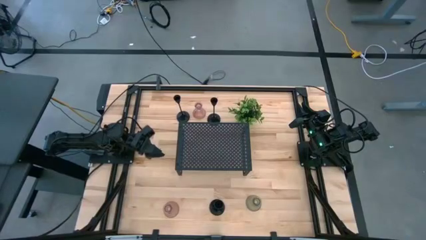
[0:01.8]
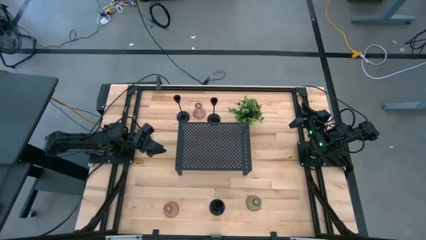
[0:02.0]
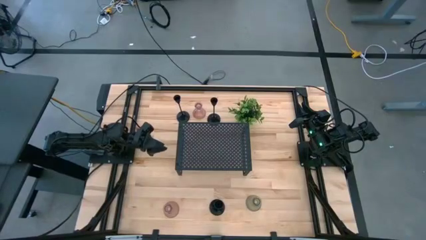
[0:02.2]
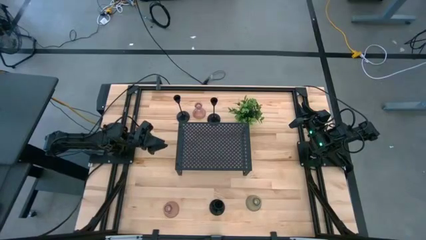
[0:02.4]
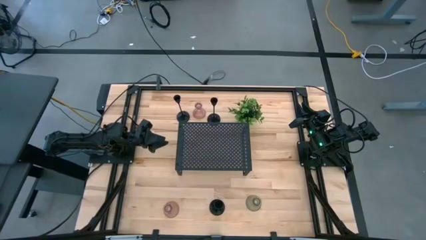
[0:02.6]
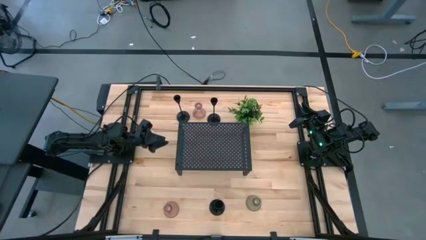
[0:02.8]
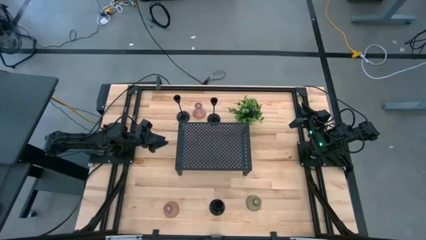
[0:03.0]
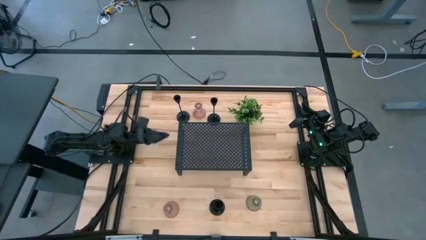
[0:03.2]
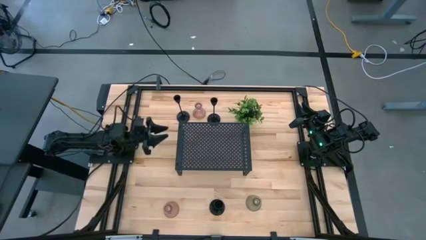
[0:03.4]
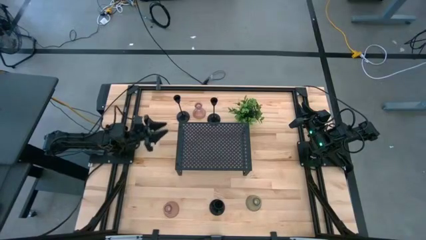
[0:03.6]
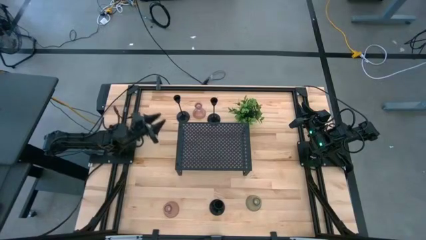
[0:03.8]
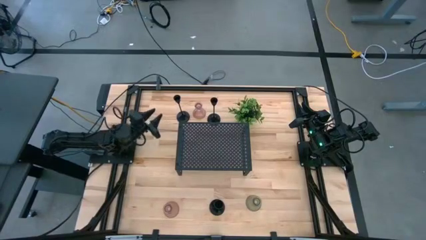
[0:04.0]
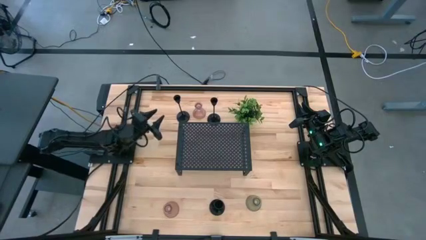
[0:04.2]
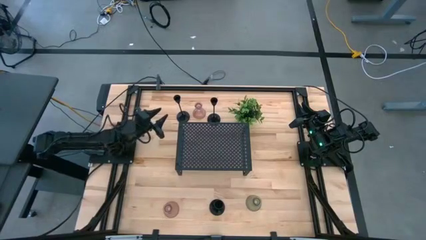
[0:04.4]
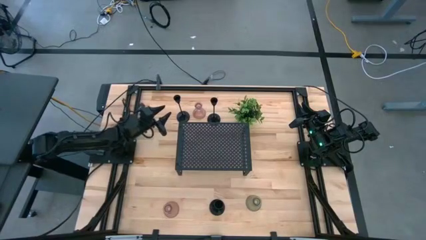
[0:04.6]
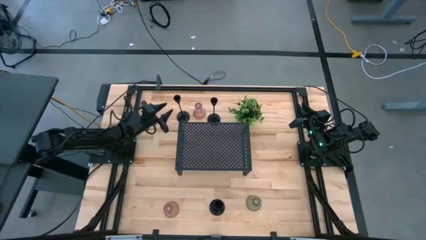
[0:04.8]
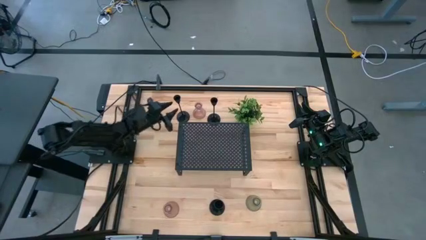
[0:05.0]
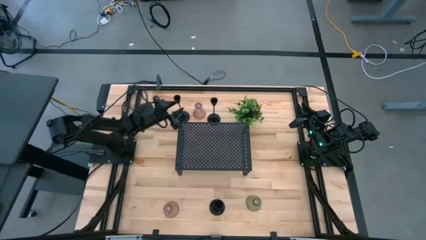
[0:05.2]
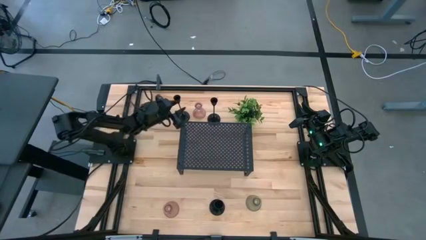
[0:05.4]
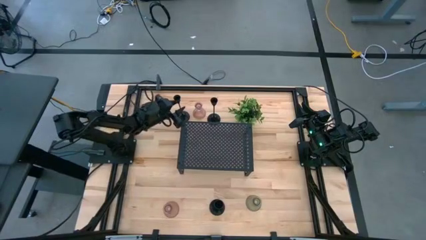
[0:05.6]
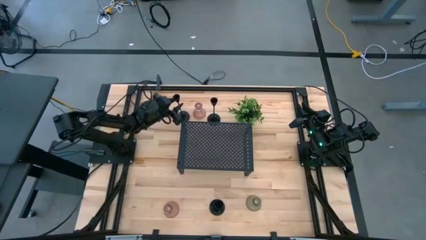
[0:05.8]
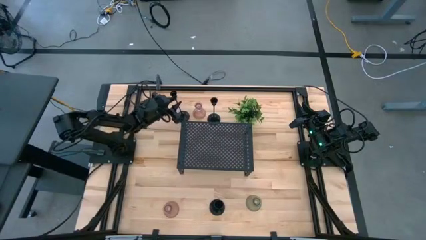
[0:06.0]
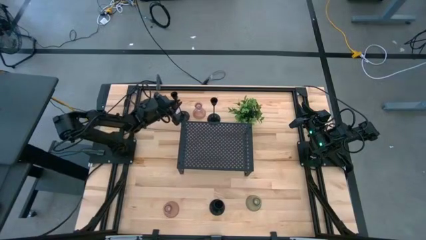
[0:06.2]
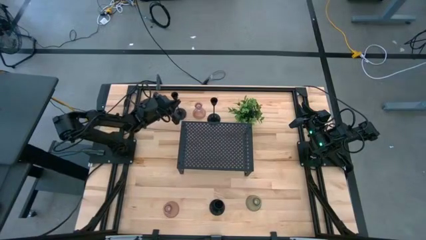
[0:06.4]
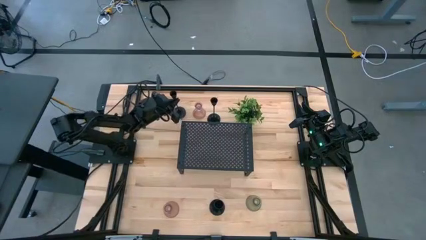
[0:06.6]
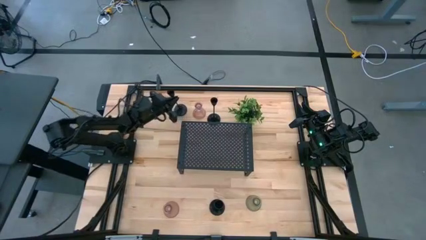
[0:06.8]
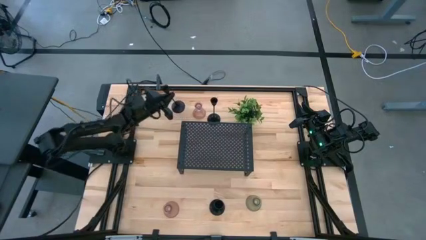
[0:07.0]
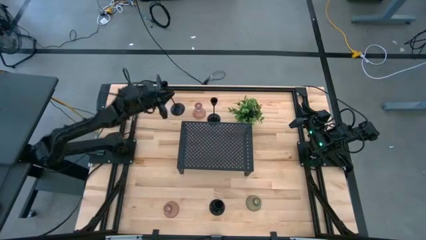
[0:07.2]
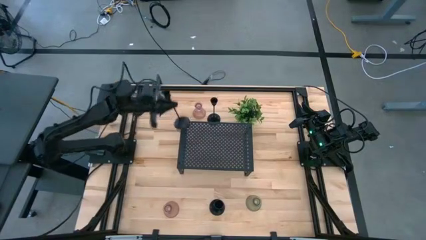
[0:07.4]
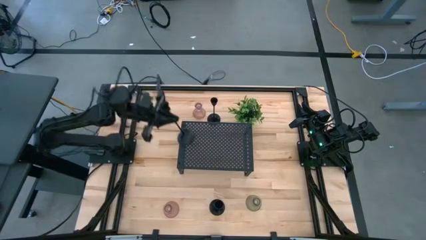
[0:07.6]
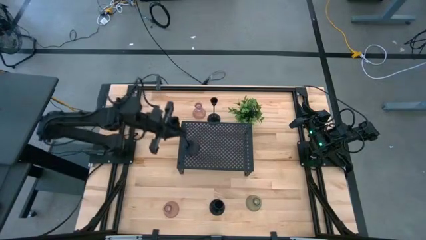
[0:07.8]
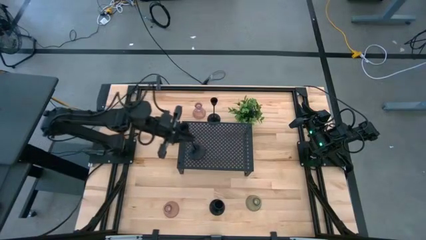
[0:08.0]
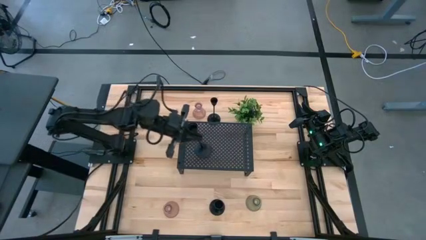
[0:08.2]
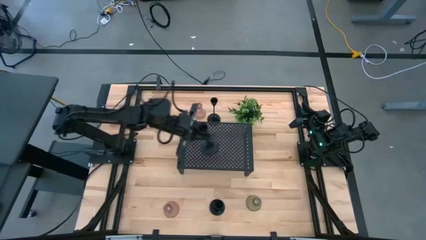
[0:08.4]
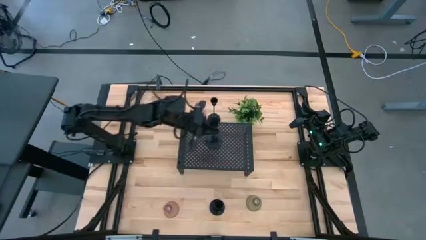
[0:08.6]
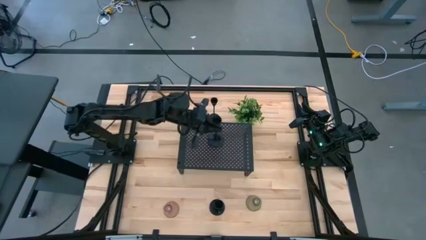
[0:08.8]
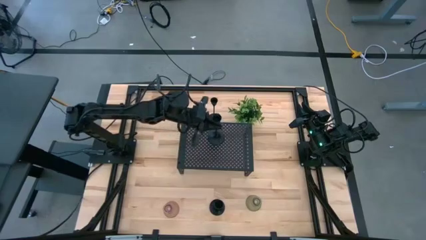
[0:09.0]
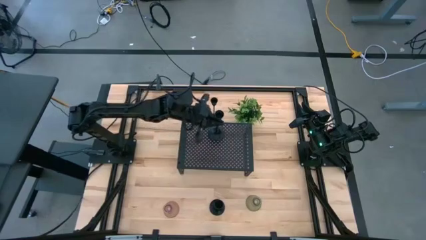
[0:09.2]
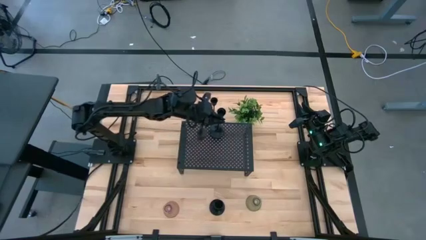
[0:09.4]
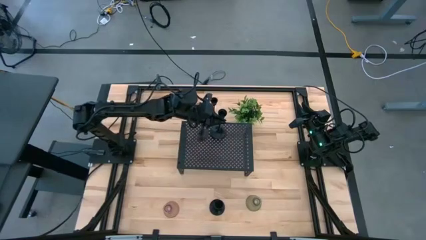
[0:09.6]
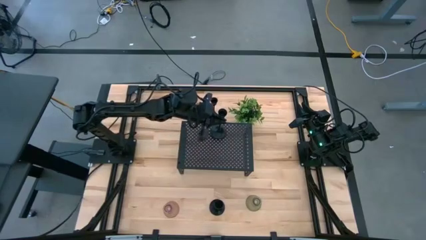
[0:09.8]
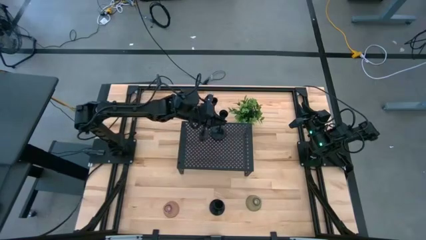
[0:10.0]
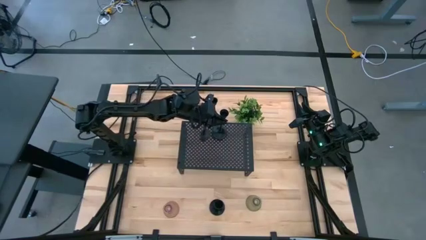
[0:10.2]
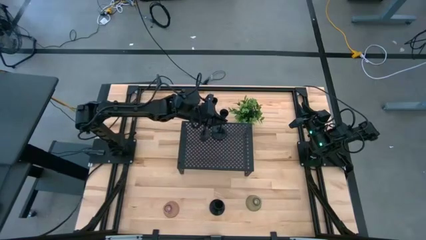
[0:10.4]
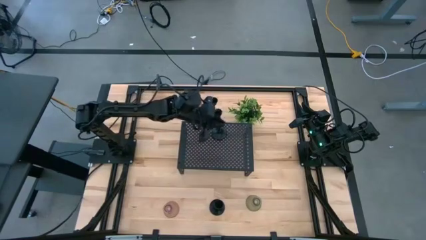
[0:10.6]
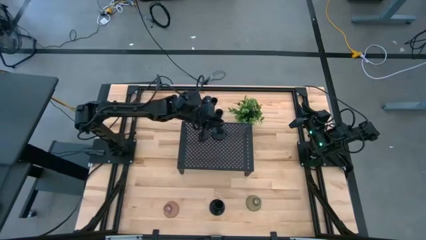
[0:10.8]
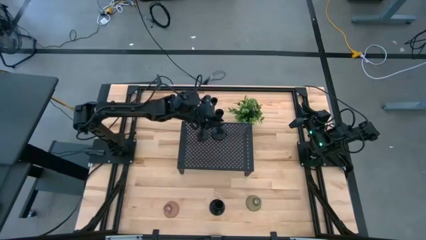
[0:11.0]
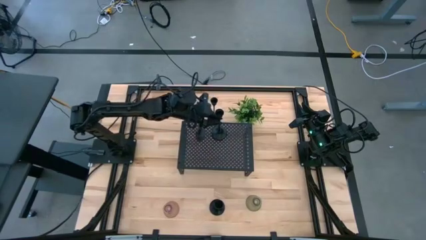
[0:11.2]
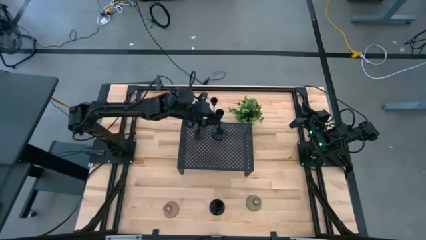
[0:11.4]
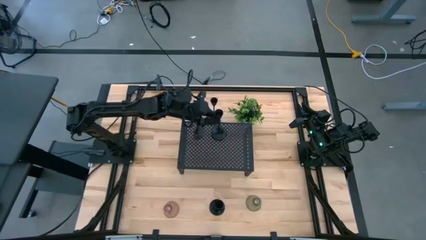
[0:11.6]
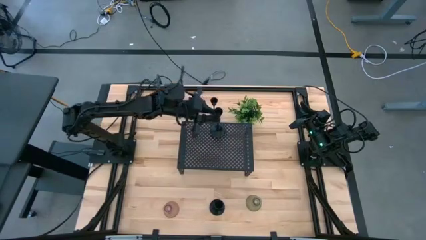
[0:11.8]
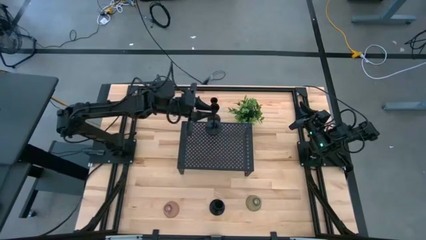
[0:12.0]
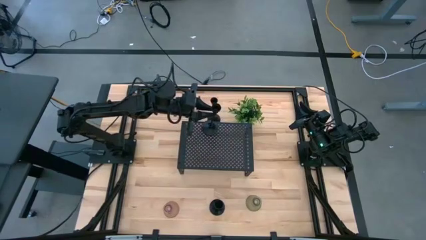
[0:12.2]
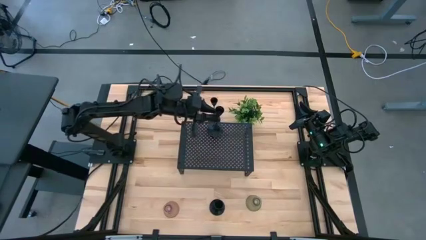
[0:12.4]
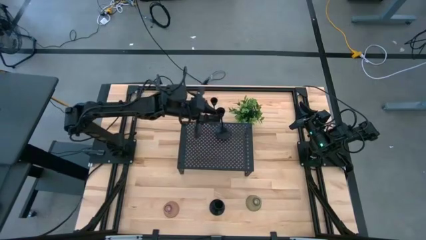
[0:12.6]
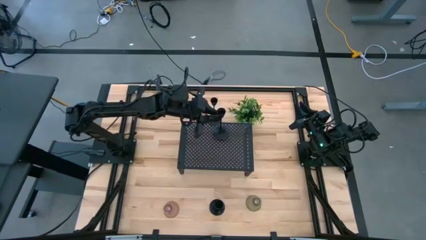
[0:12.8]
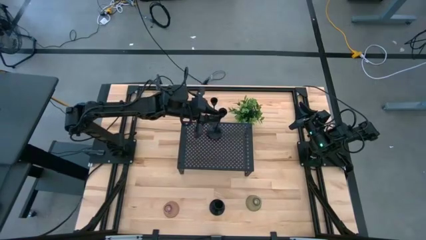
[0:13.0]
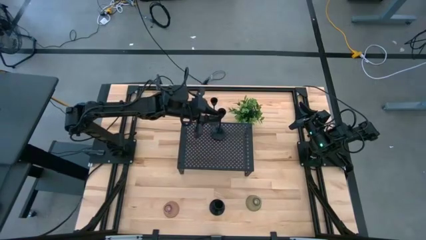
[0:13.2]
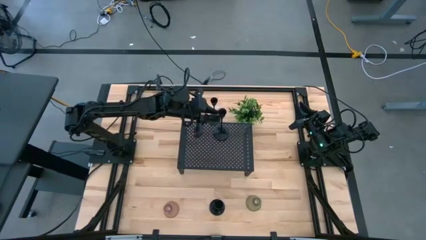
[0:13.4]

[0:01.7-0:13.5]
Task: Pick & Place candle stick holders
Put the top left black candle holder on the shelf

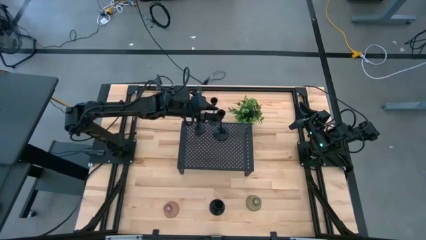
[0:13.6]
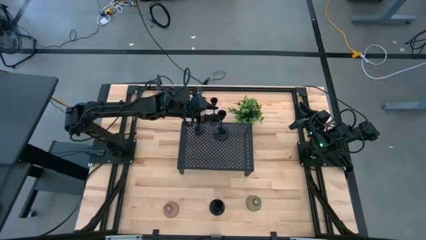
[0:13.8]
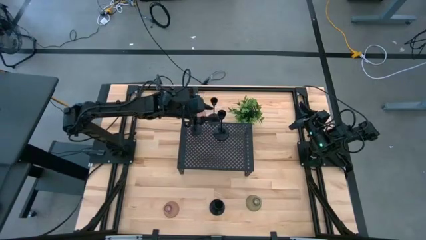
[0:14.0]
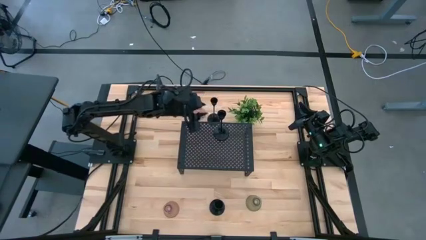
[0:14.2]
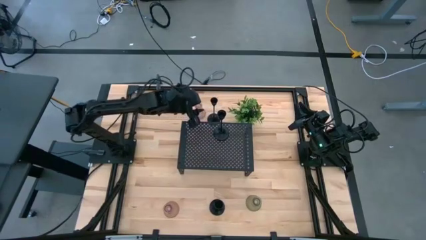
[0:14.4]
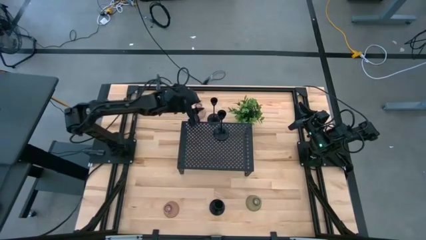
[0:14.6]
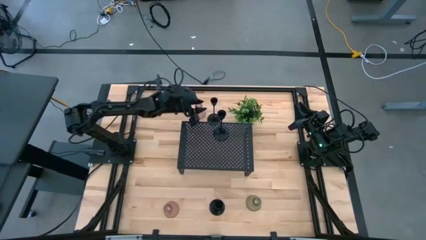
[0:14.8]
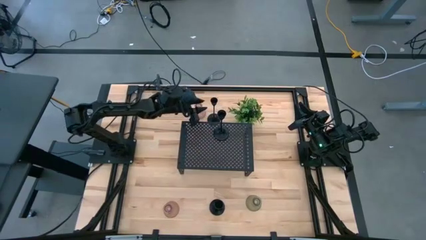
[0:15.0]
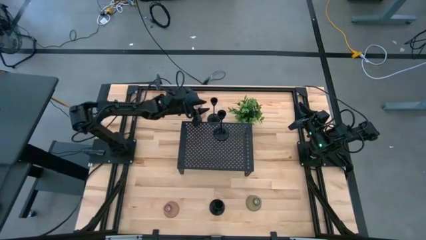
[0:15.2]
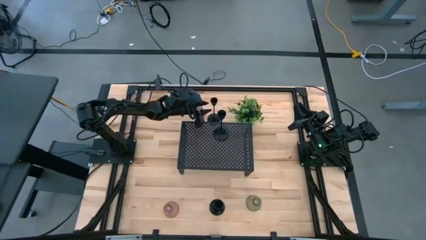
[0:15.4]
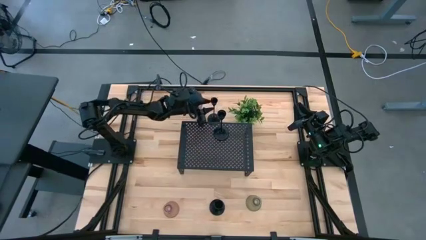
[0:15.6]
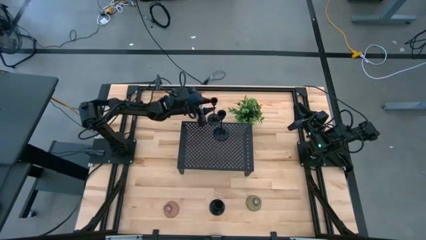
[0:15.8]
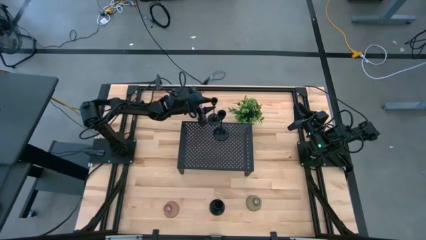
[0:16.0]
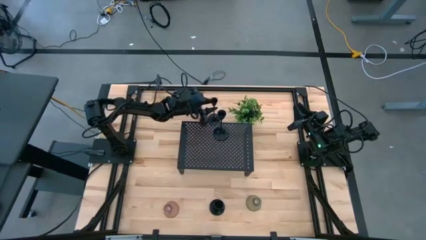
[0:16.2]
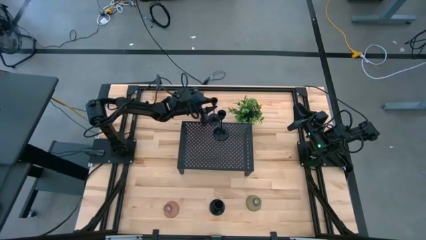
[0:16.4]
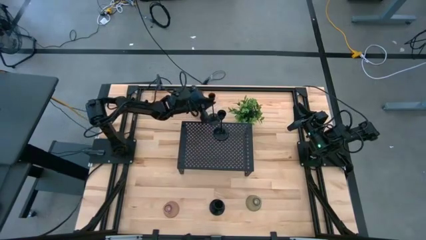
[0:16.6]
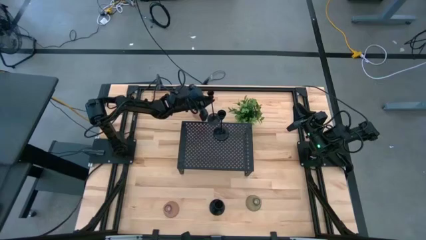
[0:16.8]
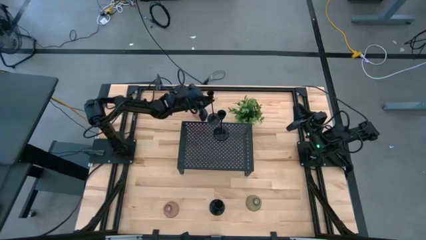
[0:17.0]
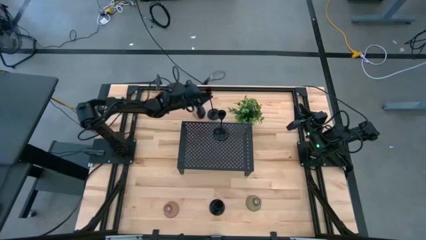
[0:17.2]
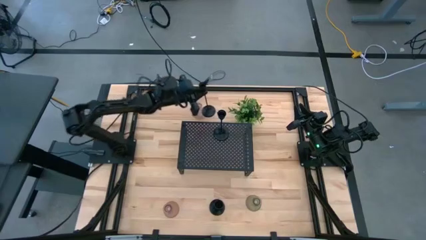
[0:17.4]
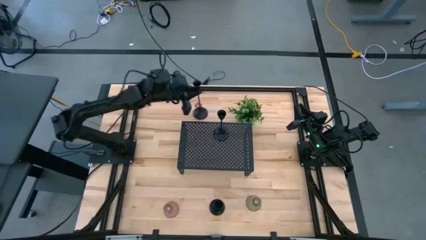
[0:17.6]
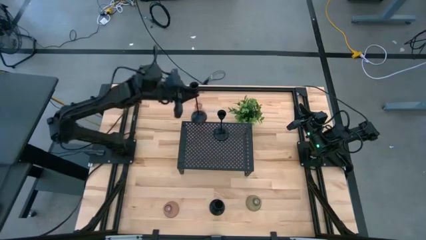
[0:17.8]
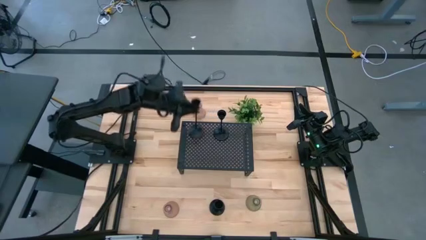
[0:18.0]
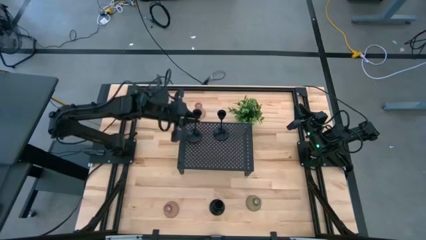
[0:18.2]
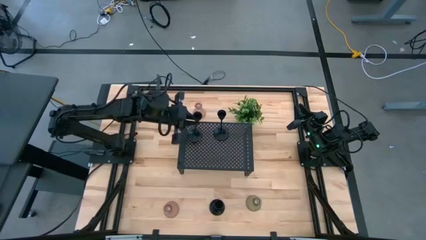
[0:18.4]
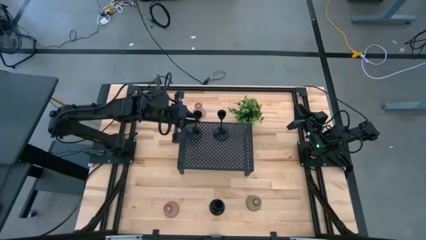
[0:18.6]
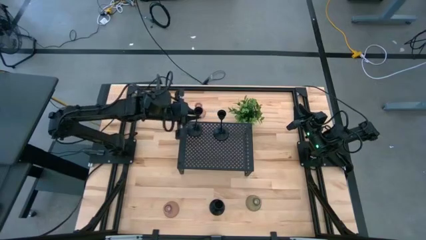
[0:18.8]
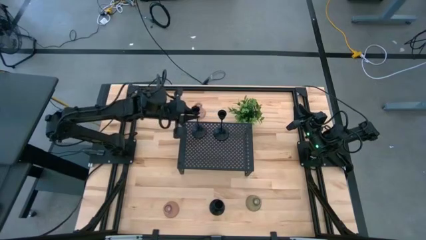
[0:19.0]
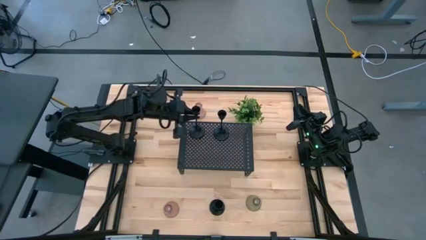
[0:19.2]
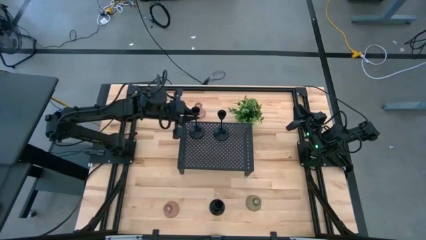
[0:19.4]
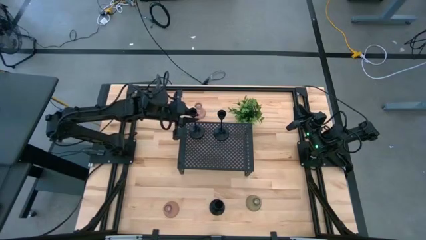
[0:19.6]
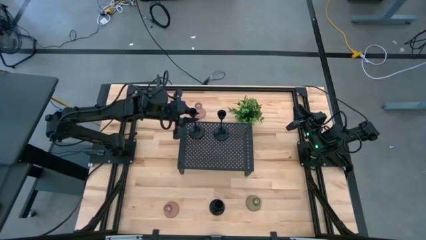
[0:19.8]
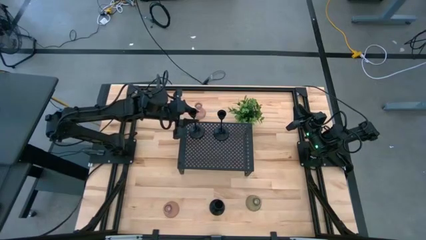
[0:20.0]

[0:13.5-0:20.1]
Put the top black candle holder on the shelf
